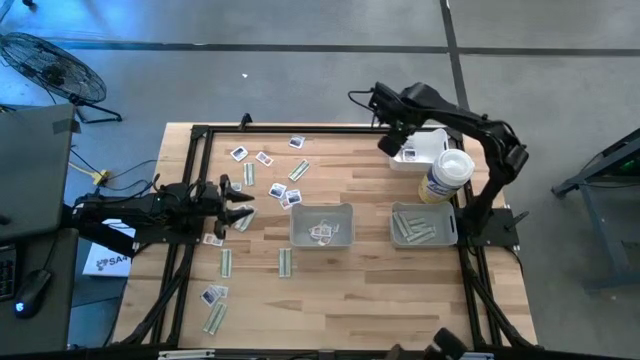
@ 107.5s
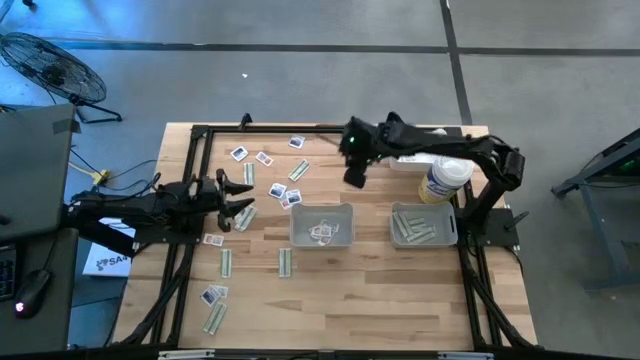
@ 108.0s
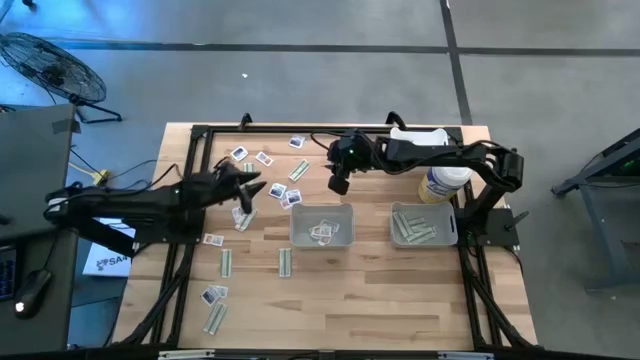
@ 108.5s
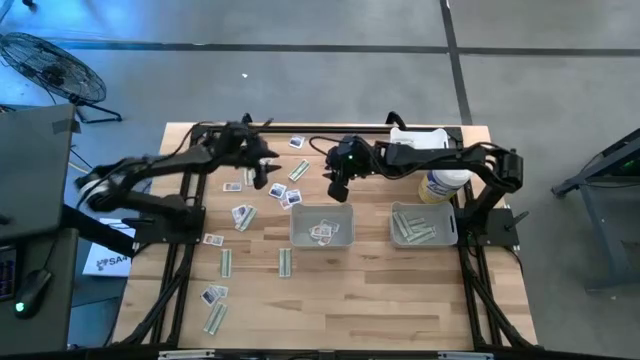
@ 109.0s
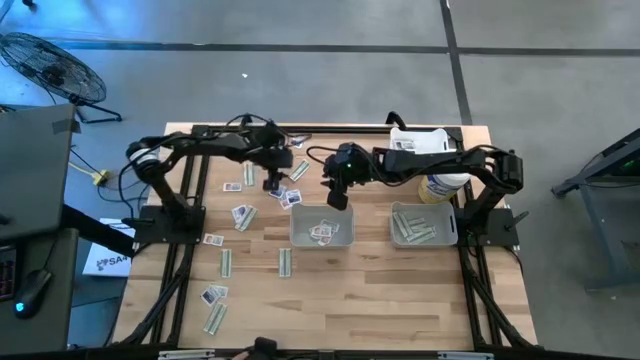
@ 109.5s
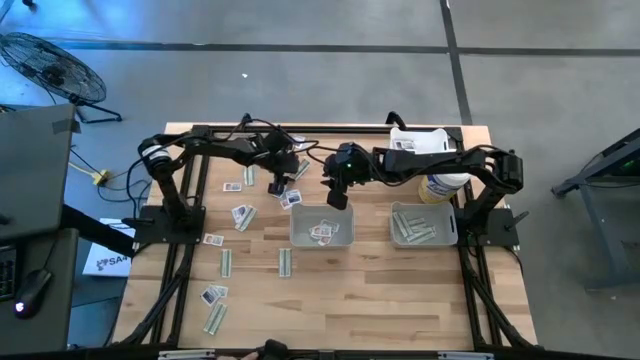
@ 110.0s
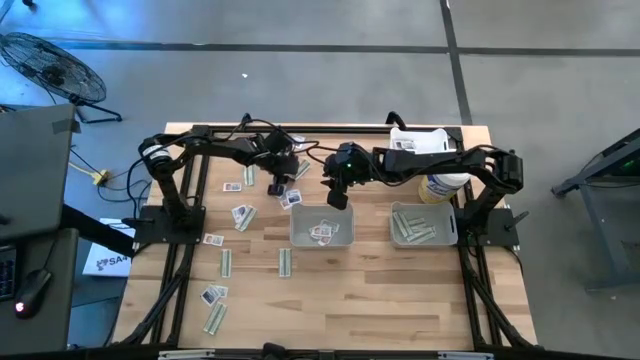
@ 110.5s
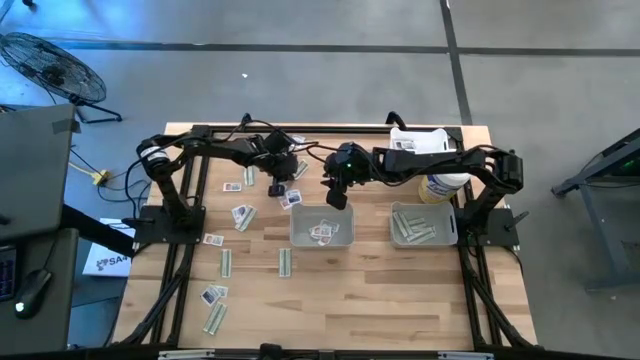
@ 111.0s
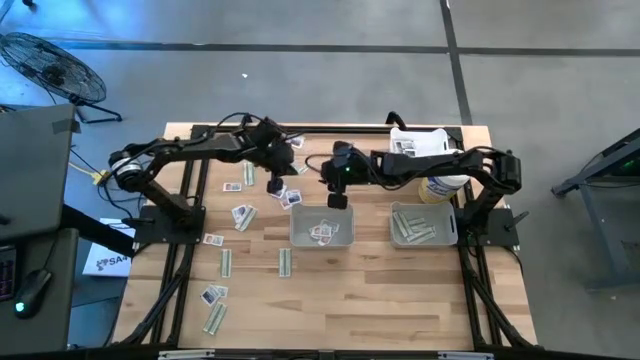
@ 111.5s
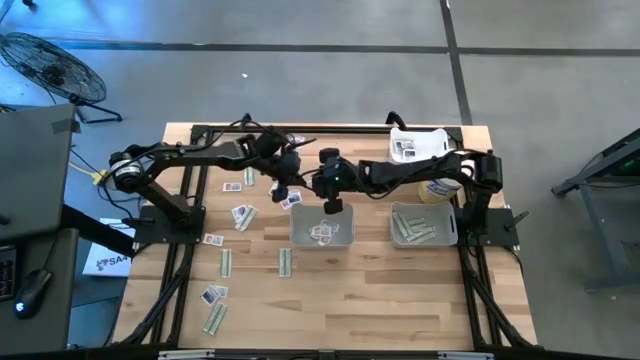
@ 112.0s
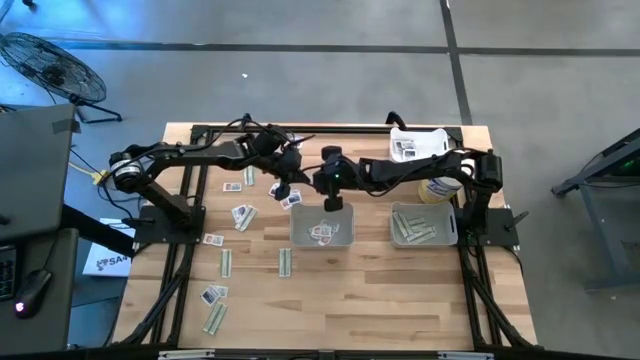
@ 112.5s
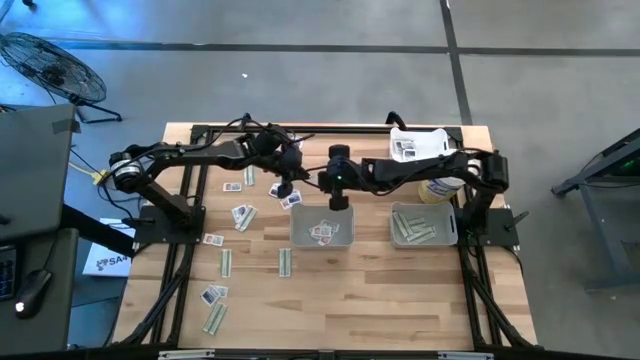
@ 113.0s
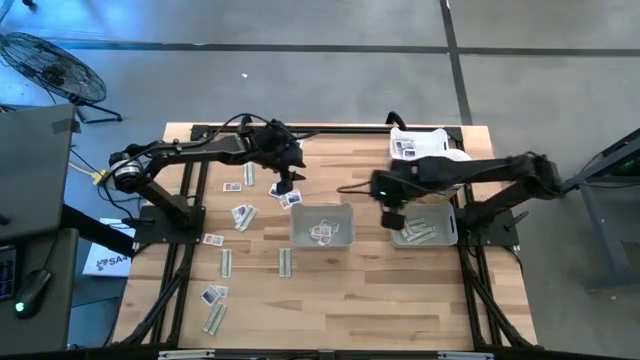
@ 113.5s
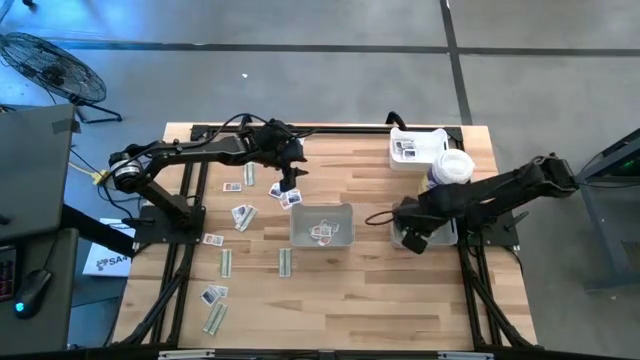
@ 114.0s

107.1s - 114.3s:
Task: Pick & Place First Aid Supplies
Put the green pad into the right gray bin

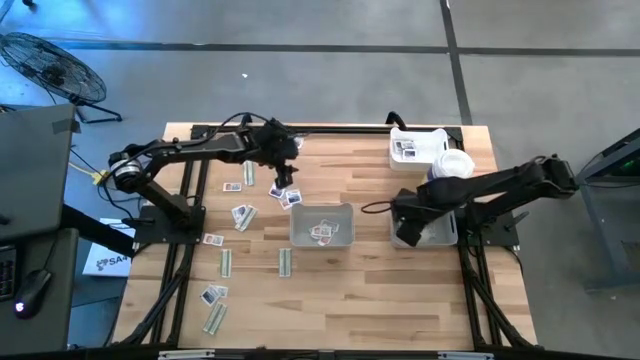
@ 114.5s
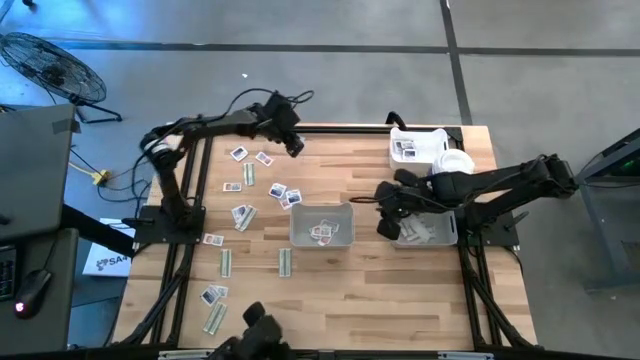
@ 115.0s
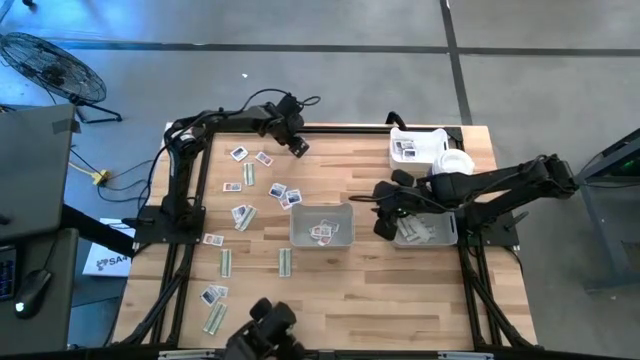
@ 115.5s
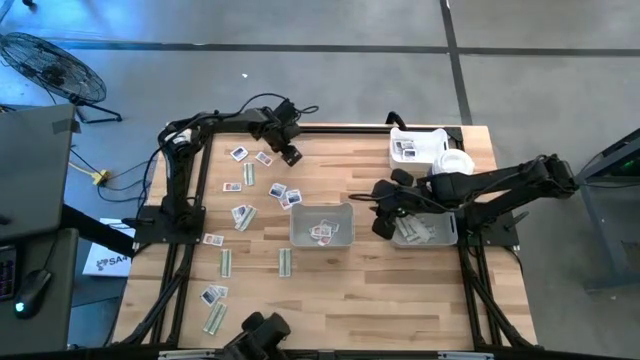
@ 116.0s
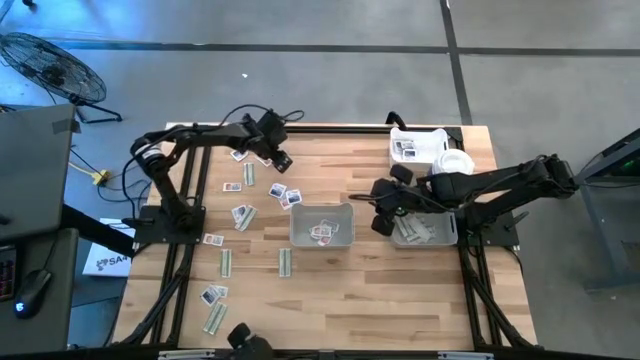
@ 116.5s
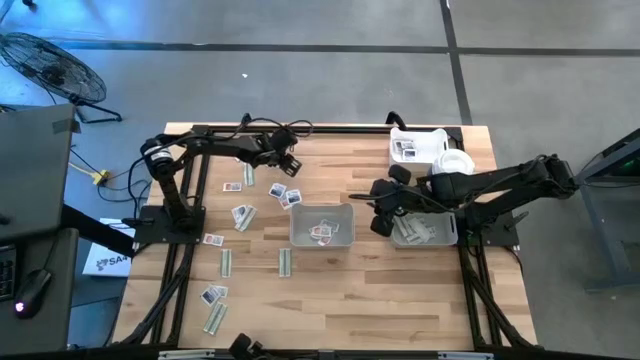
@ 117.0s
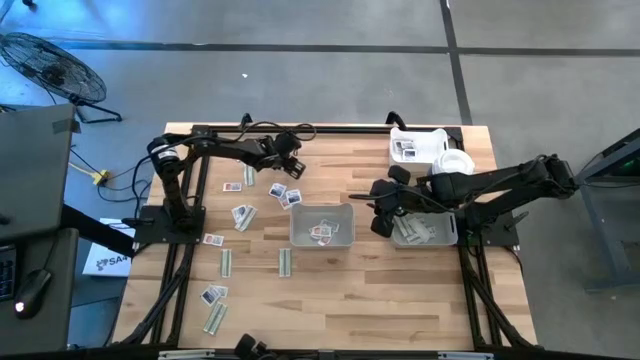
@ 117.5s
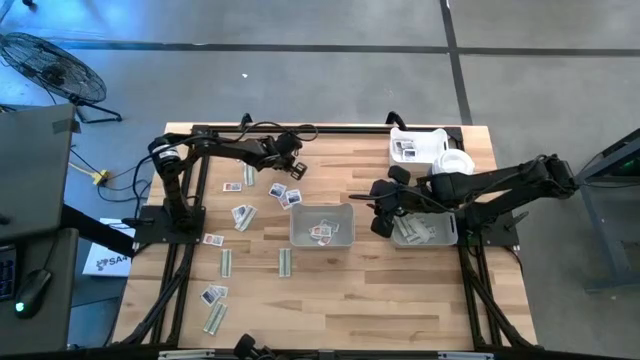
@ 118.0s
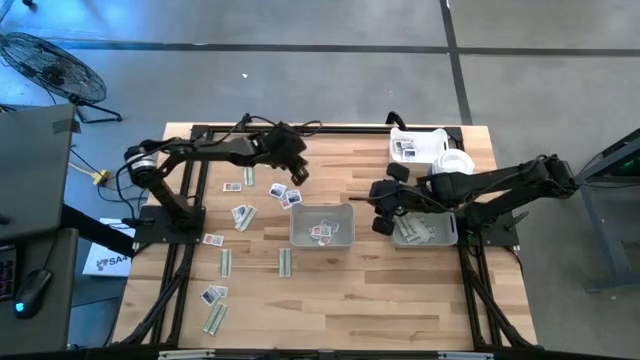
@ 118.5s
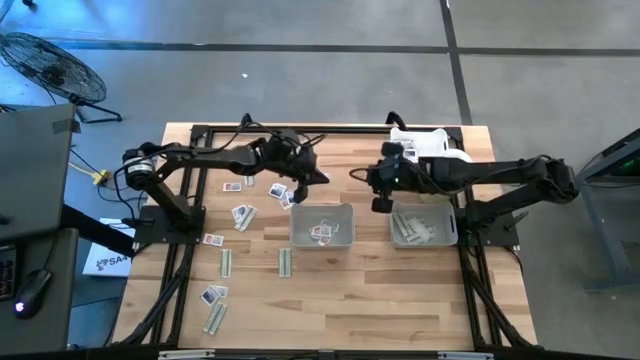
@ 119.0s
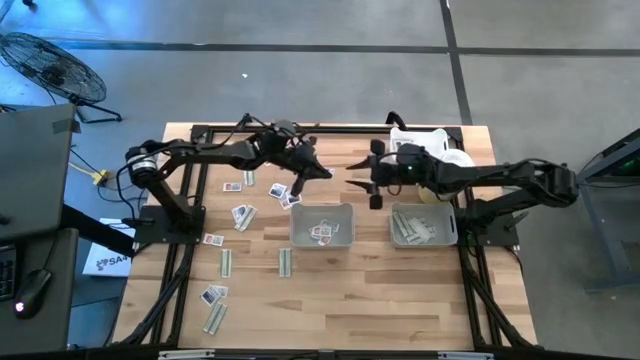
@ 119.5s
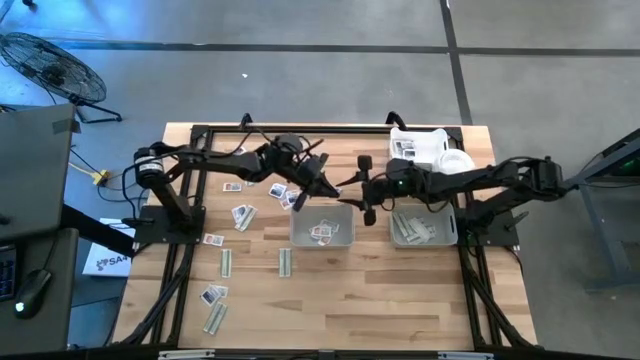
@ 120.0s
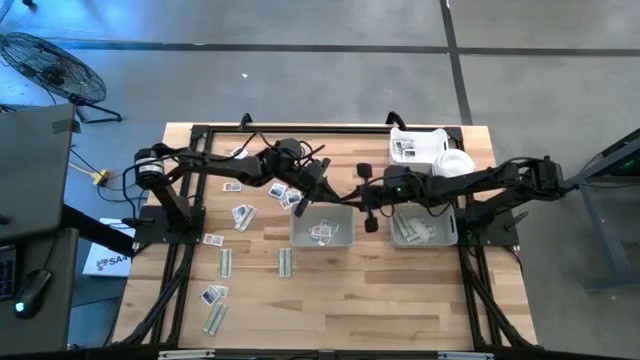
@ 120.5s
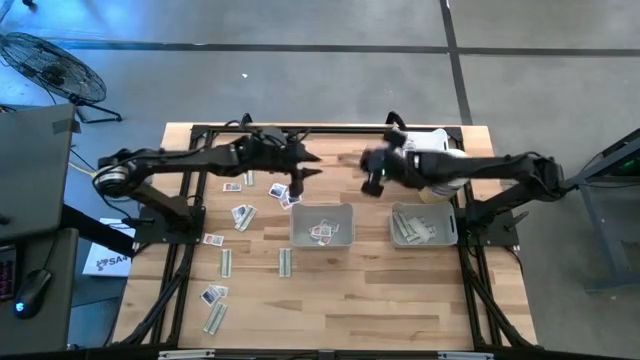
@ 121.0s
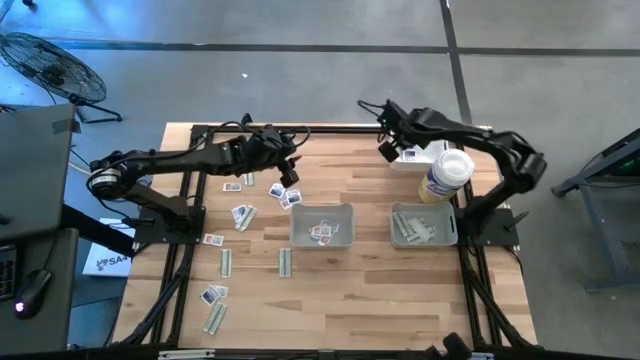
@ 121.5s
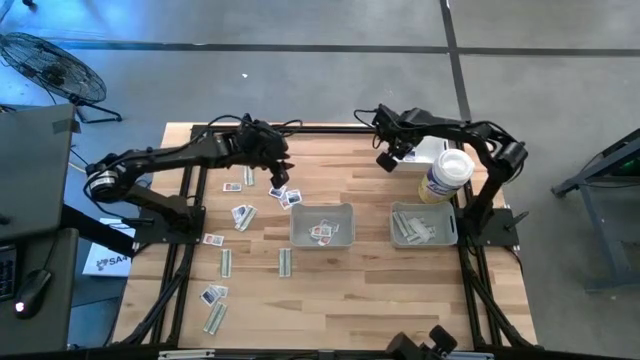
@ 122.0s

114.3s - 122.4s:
Put the blue pad into the white bin

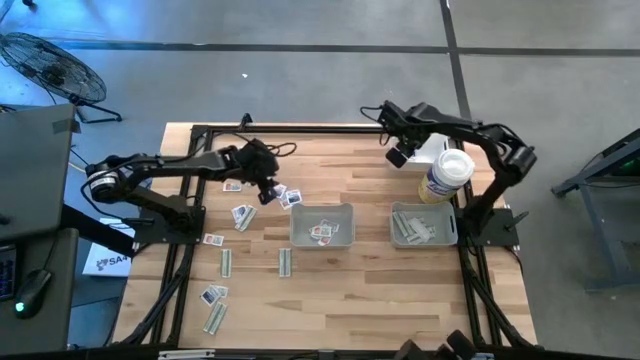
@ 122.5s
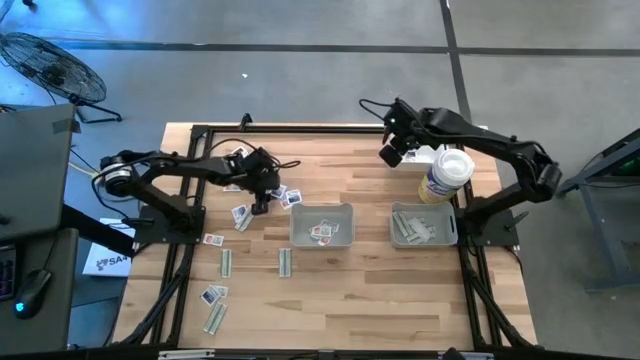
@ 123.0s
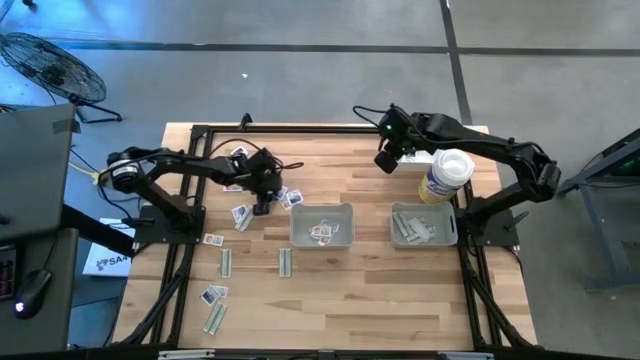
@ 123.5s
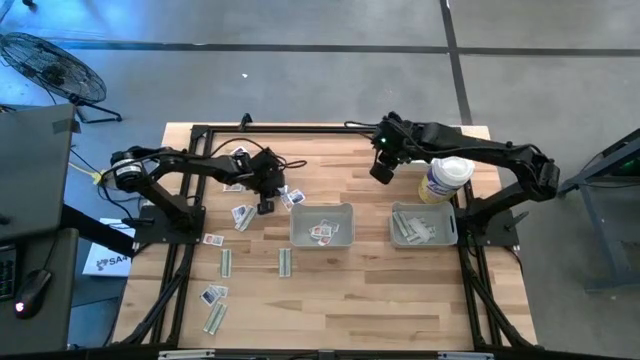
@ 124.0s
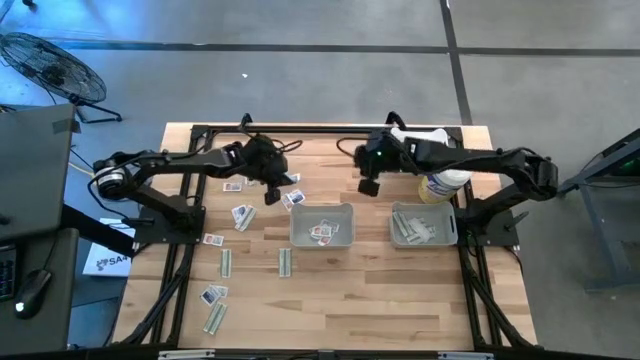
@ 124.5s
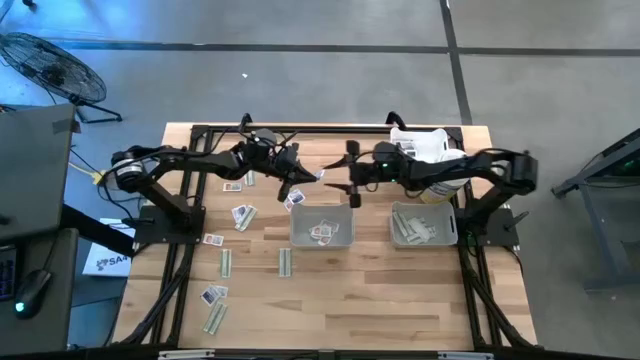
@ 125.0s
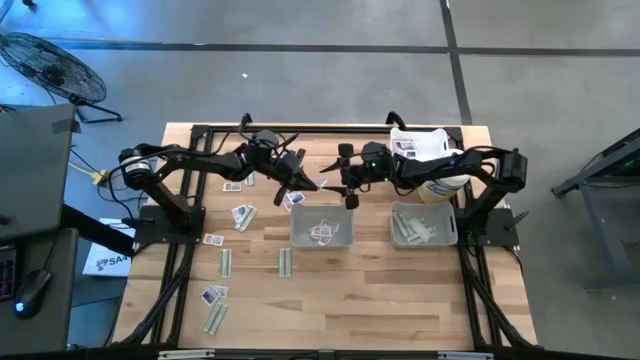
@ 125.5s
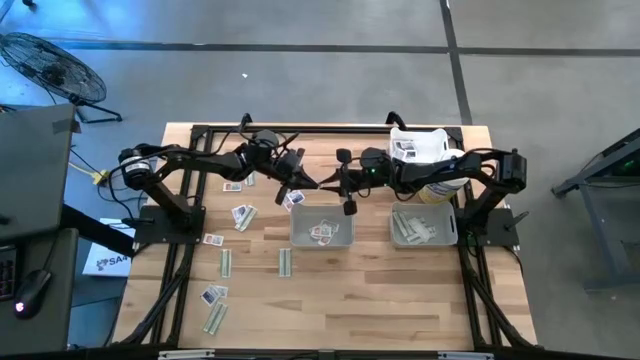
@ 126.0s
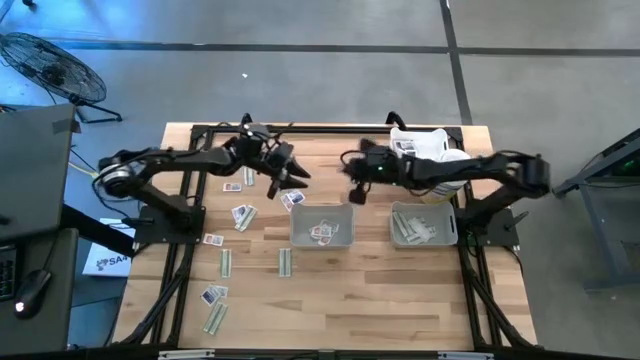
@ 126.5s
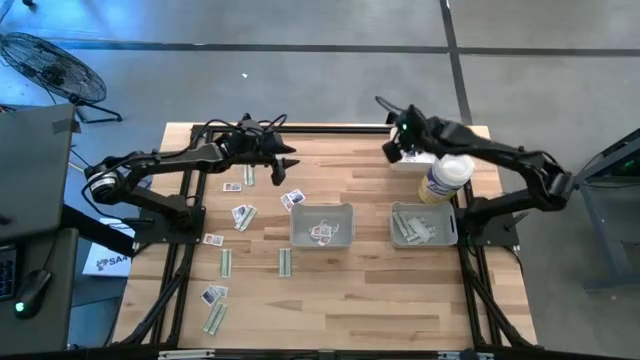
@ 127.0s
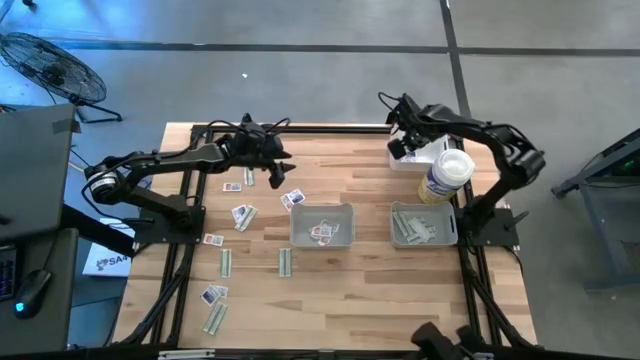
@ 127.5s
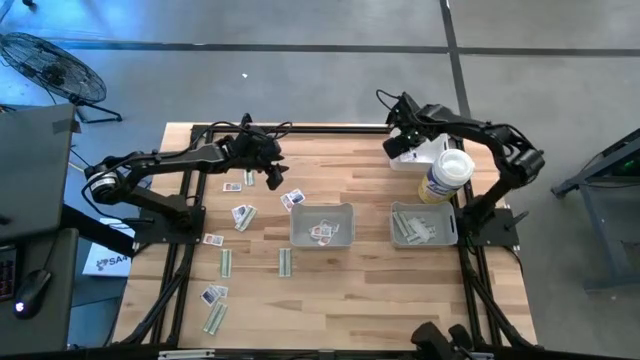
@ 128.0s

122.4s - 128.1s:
Put the blue pad into the white bin

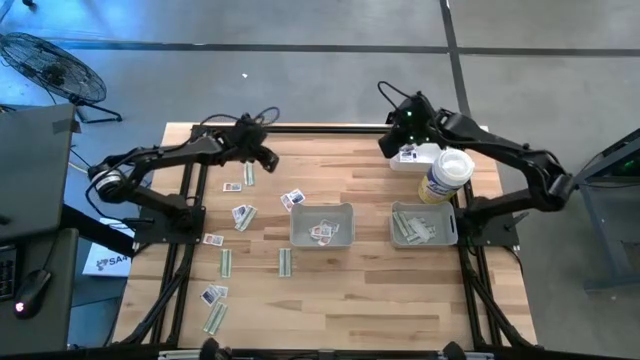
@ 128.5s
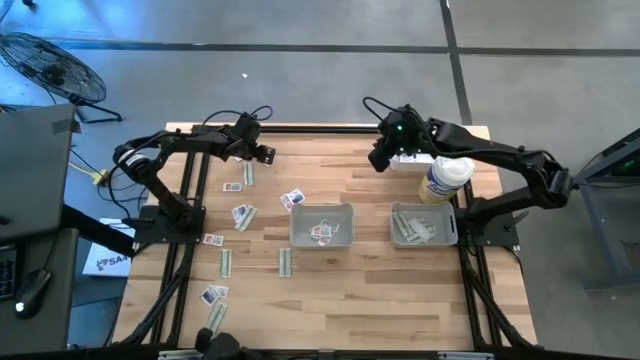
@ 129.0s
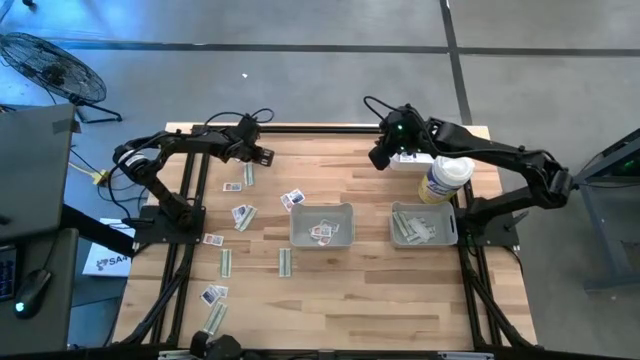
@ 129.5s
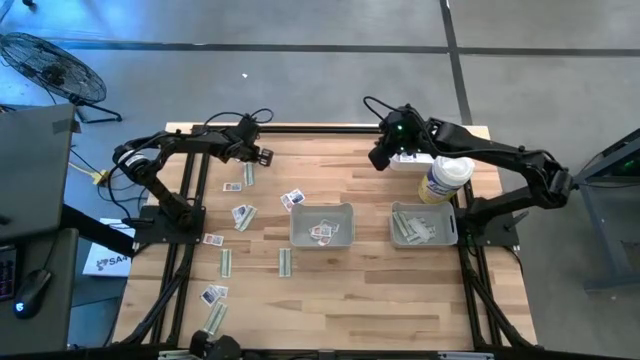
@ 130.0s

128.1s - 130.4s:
Put the orange pad into the left gray bin
